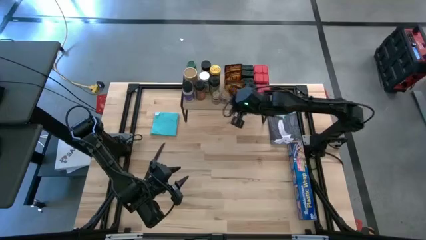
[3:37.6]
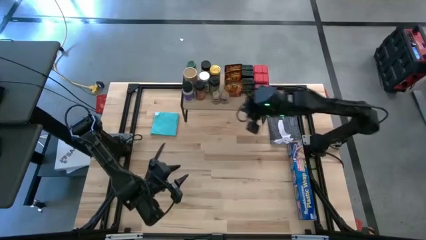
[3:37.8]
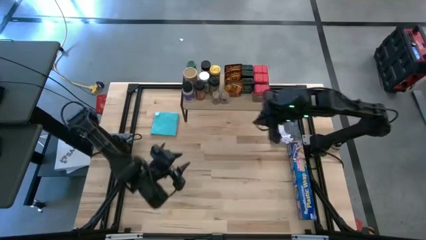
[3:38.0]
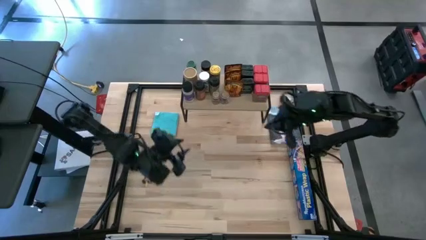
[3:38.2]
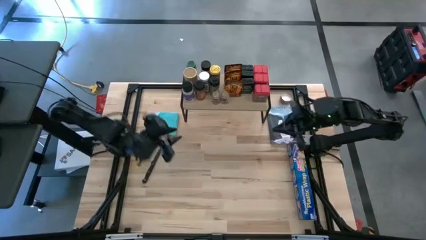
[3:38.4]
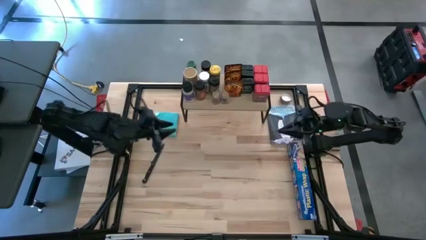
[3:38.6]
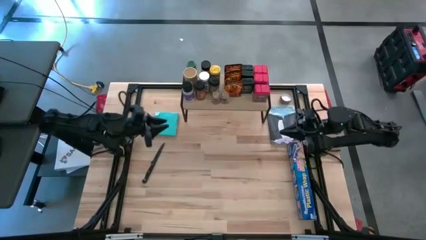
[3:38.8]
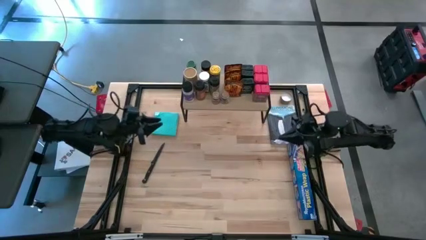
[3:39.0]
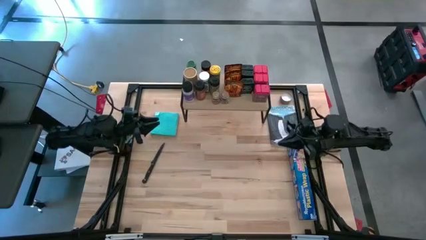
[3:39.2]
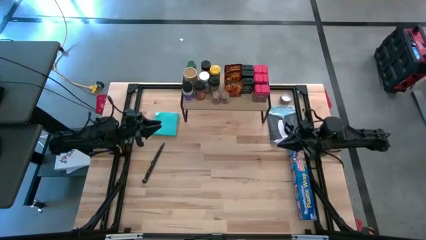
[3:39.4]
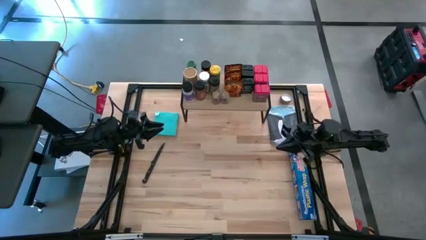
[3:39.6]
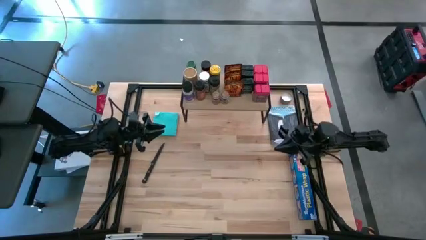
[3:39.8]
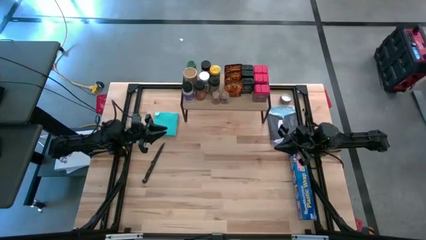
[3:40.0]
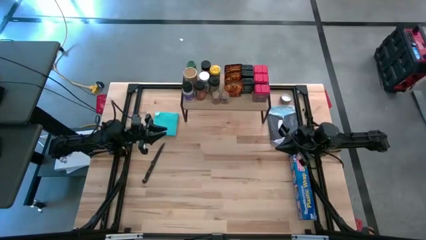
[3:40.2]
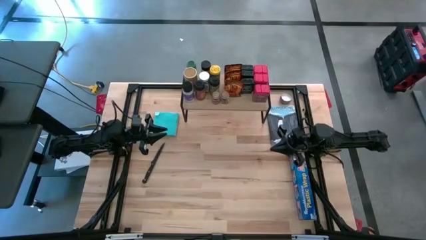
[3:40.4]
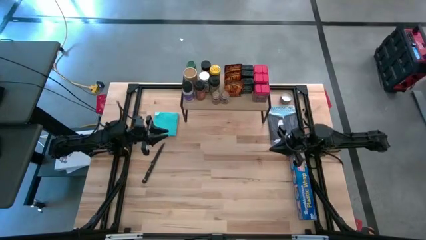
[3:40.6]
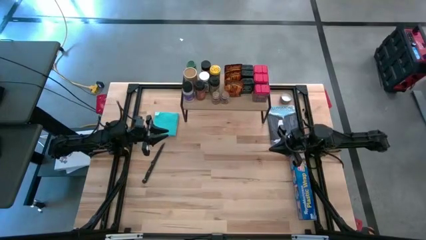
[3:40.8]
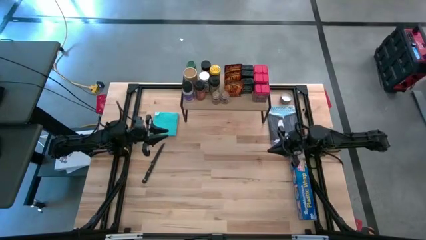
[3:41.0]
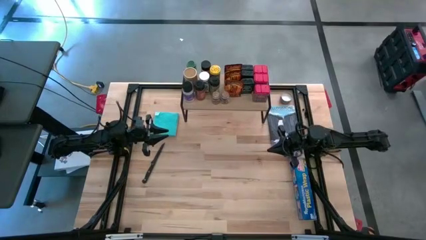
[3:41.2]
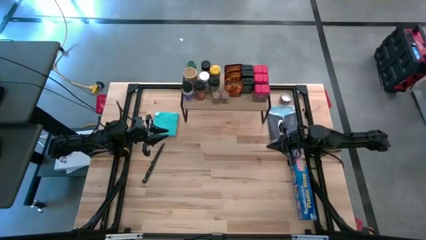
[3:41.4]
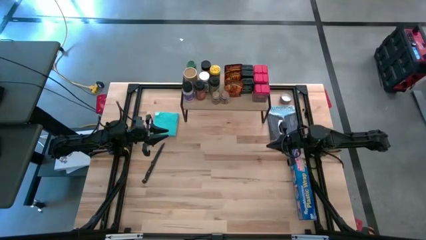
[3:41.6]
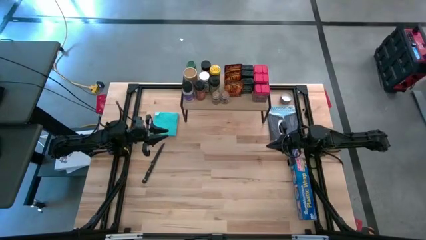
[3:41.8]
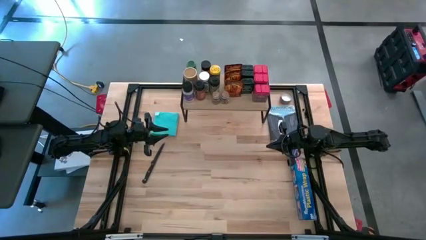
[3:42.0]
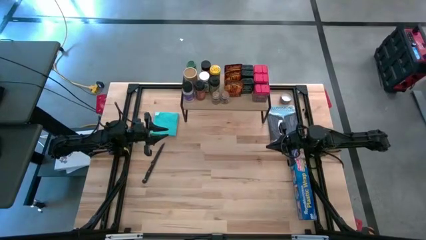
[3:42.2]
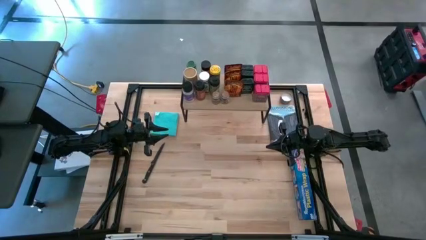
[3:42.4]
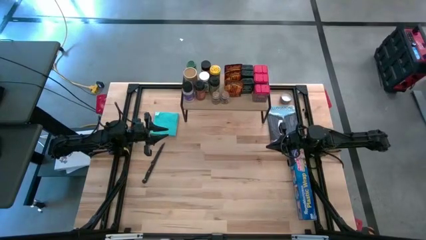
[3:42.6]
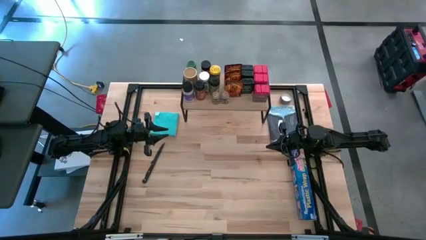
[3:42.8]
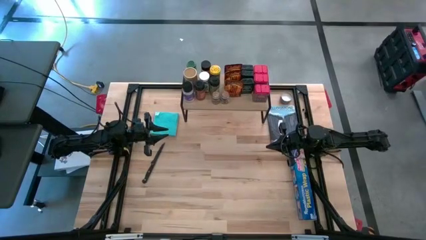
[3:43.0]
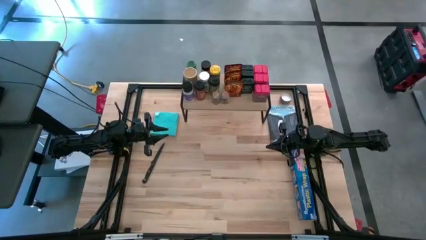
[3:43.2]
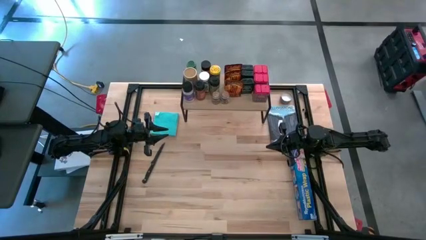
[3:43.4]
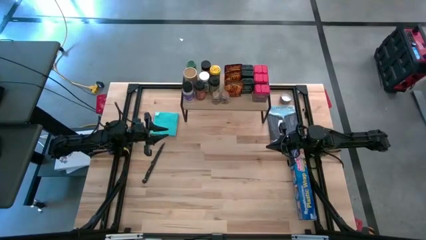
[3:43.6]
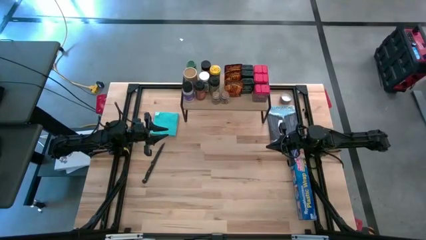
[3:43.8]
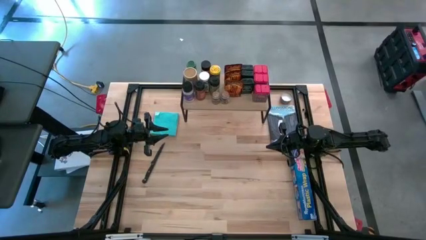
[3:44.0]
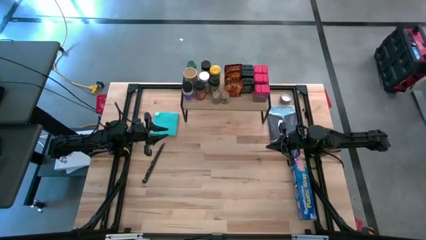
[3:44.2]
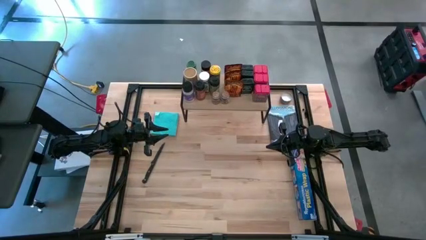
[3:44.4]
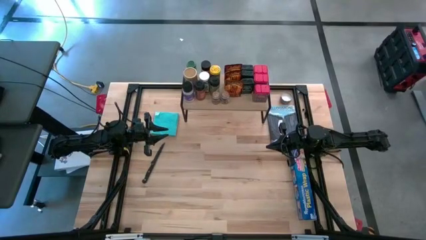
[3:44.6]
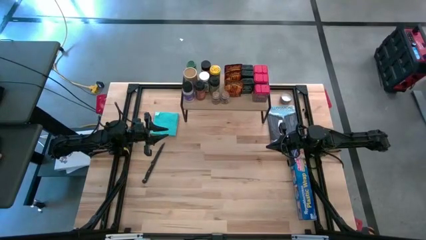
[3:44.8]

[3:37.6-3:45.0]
Task: Shelf spices
Return to Home Position

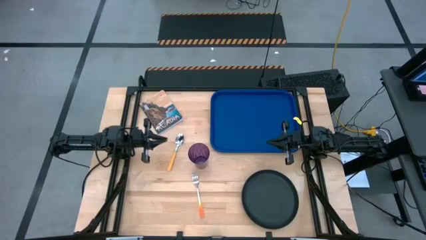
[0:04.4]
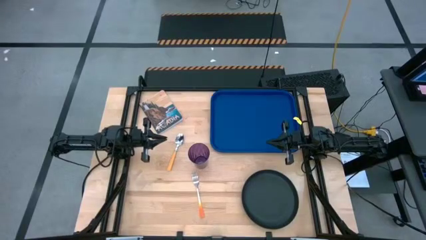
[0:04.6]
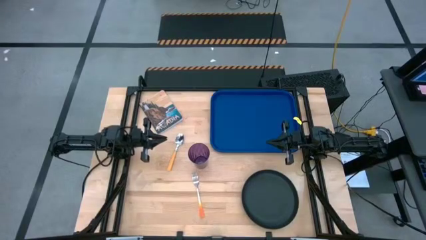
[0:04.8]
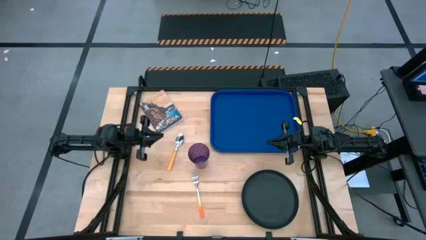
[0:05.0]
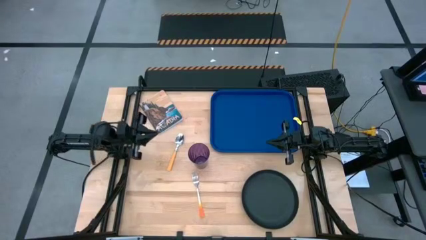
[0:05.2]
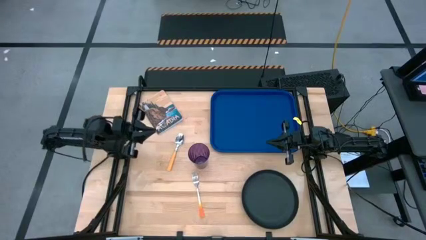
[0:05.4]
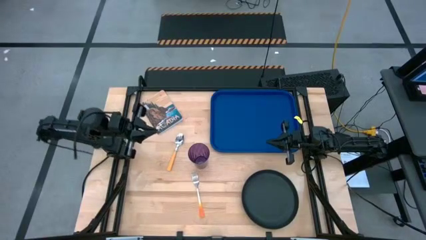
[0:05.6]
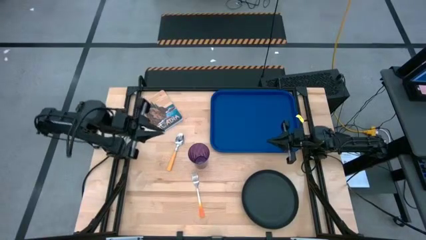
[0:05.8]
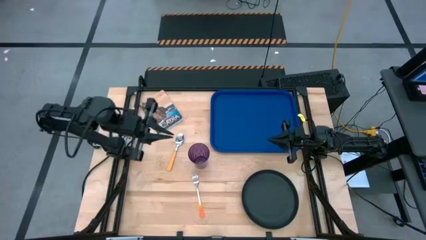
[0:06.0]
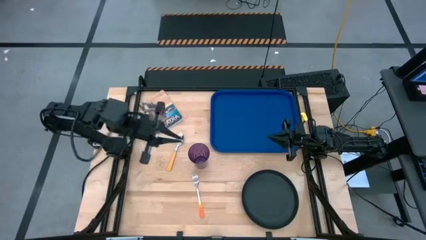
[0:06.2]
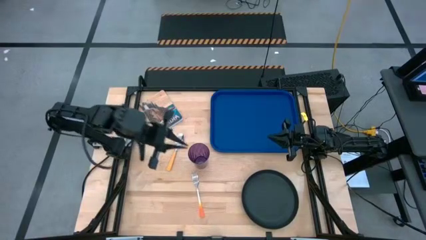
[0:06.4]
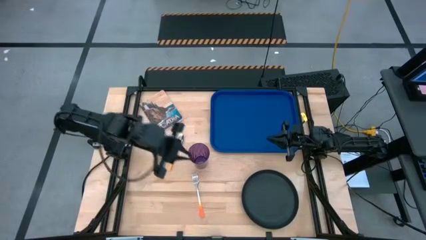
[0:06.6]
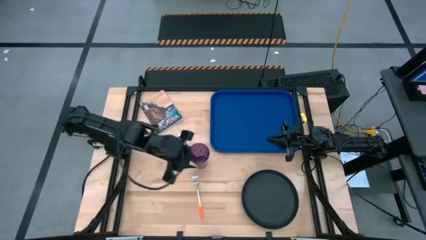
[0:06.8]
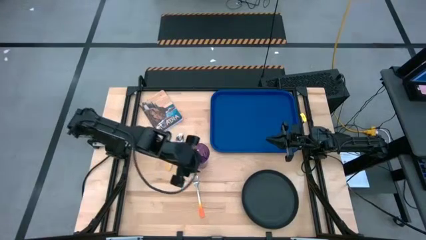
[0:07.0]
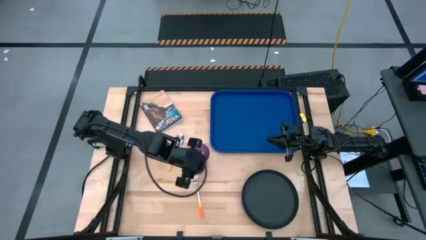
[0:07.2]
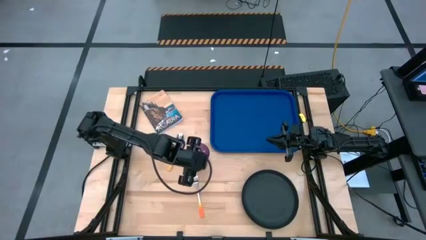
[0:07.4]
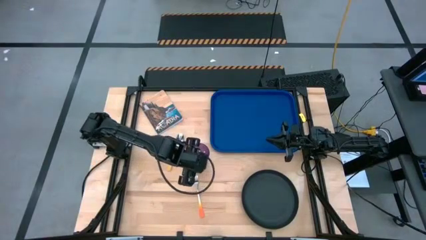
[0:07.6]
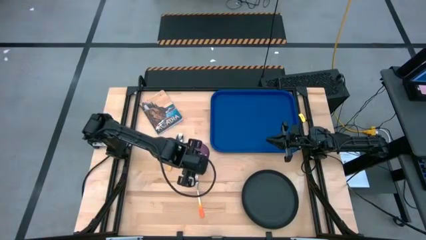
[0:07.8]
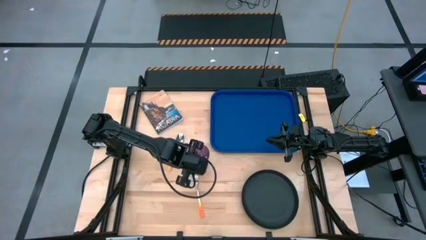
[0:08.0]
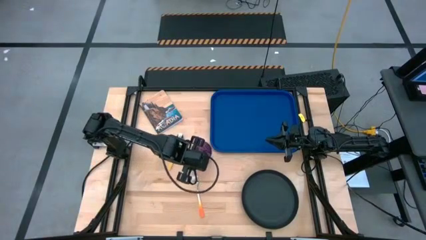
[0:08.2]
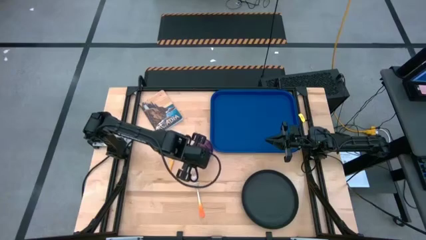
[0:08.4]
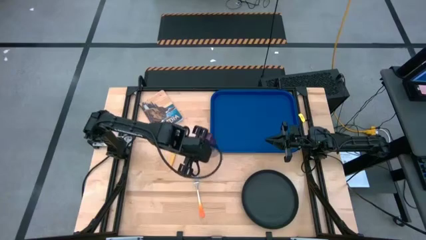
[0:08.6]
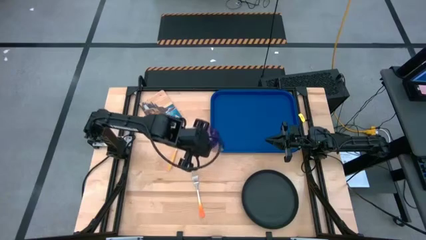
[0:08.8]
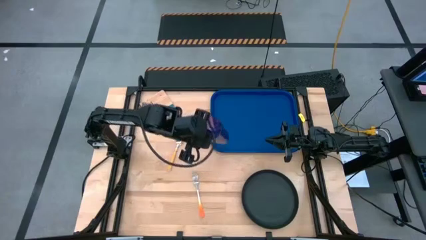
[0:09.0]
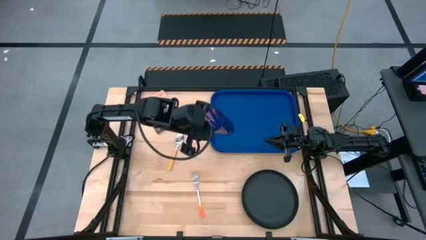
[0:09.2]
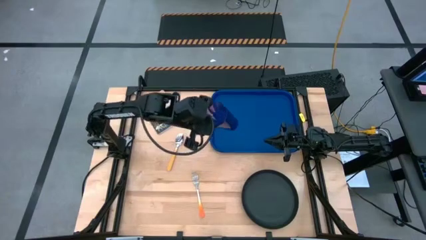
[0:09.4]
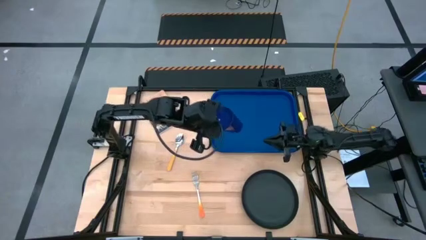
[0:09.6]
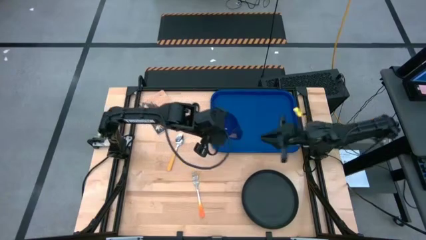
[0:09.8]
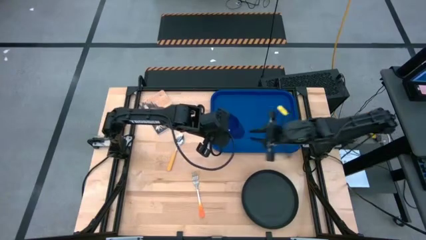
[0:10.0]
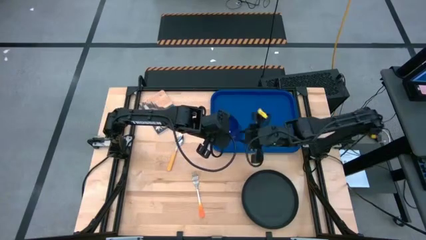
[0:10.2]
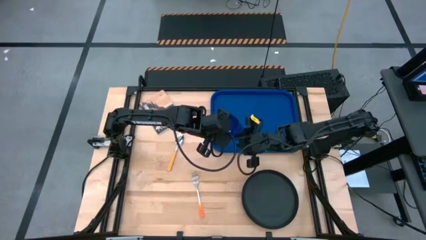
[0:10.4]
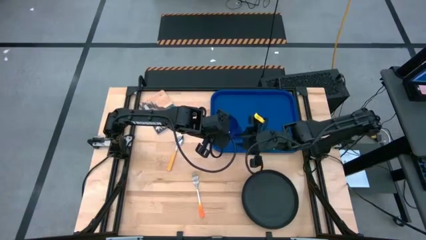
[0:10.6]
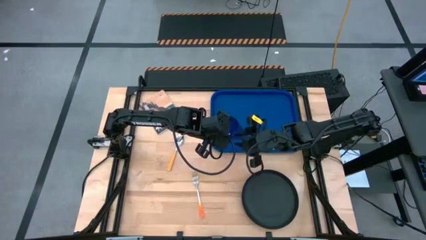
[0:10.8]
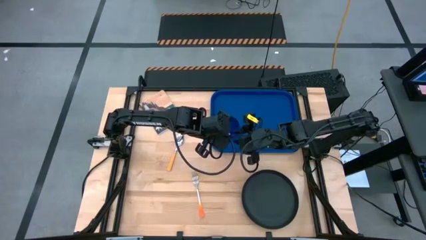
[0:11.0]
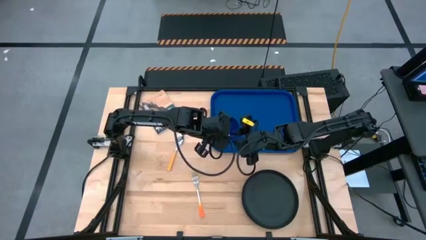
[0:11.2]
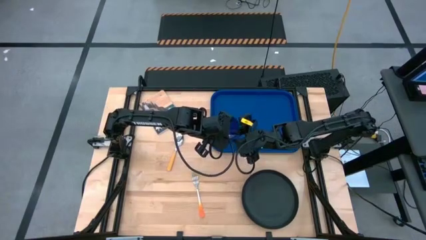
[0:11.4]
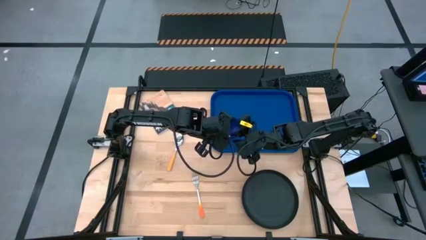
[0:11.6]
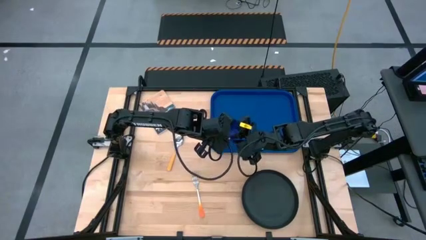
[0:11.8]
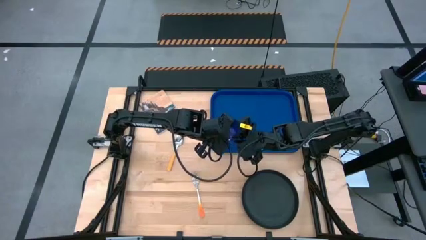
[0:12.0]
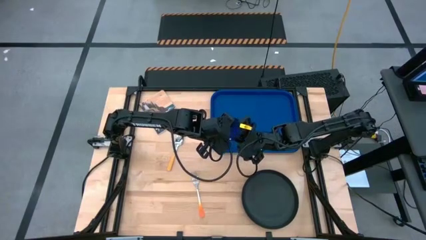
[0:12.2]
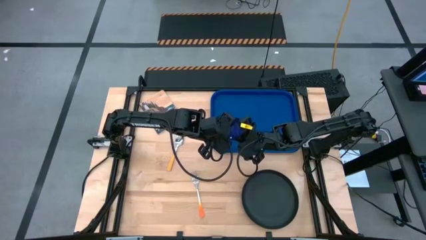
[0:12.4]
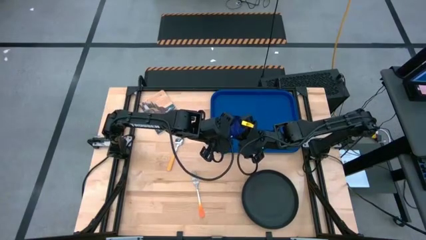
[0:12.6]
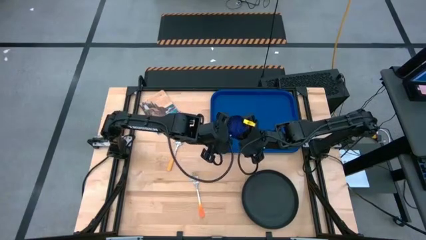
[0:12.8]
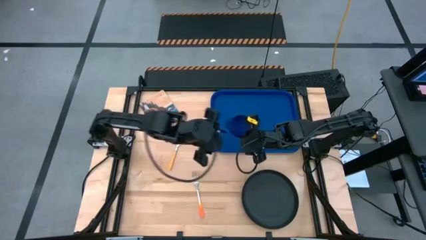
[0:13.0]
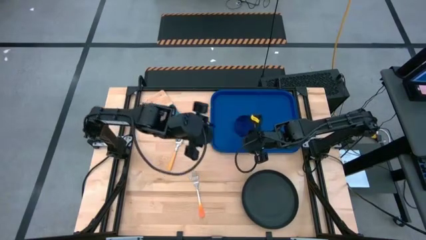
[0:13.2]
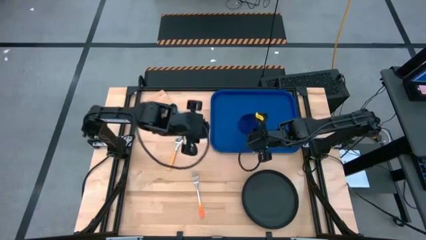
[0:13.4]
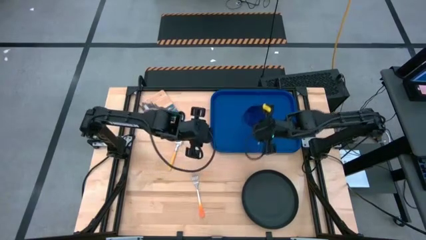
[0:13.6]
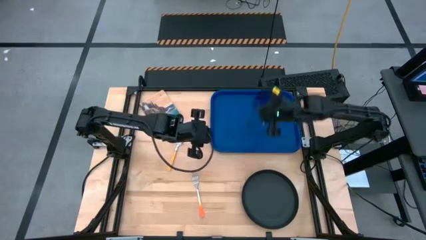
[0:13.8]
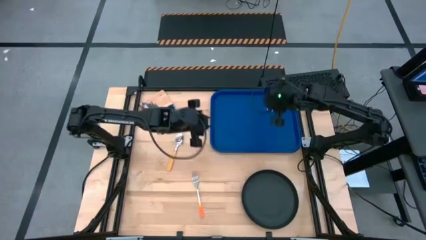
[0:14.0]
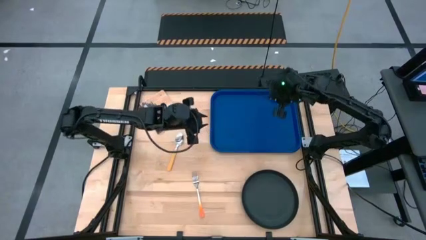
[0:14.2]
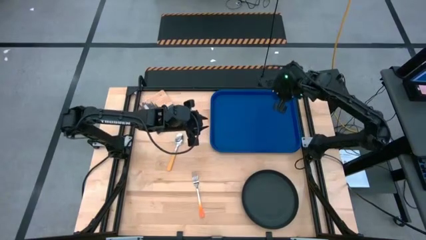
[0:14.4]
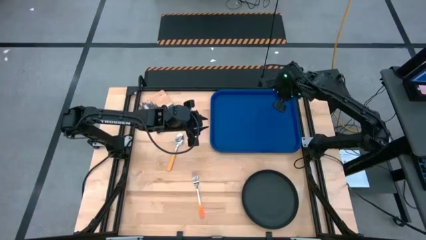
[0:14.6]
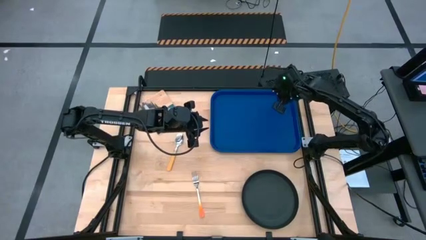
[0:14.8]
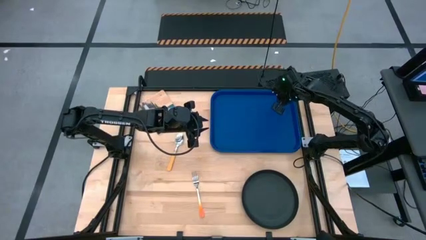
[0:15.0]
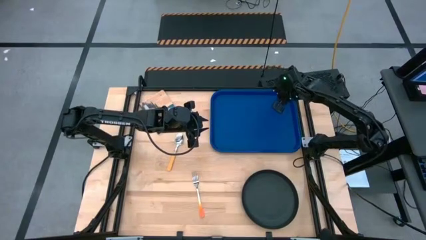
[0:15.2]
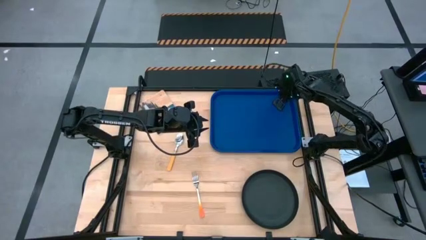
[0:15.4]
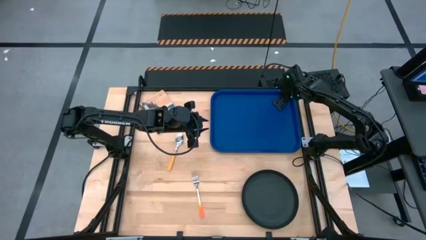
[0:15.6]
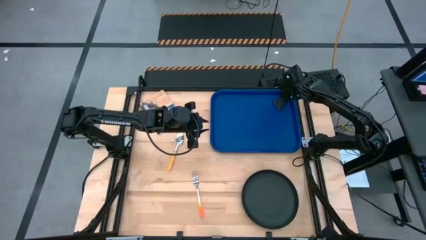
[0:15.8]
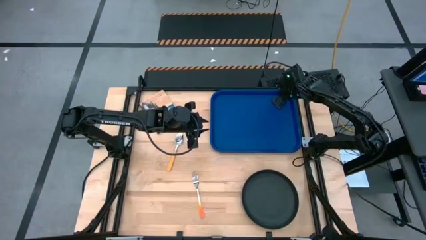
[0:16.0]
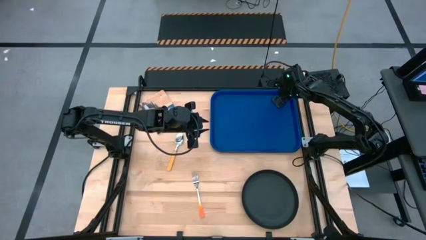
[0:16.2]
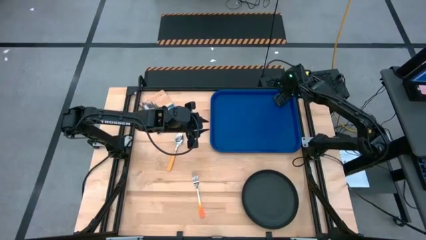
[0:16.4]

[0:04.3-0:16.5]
Task: Pick and place plate/cup/fork/spoon on tray
Put the violet cup on the blue tray
